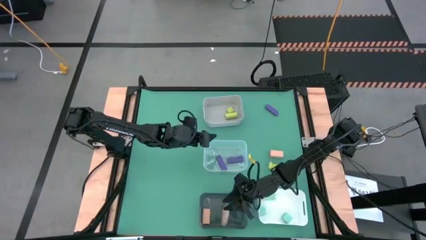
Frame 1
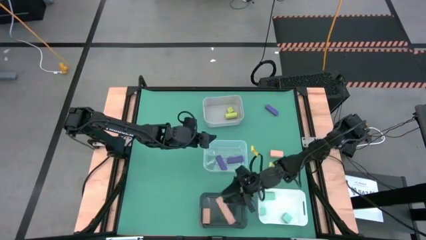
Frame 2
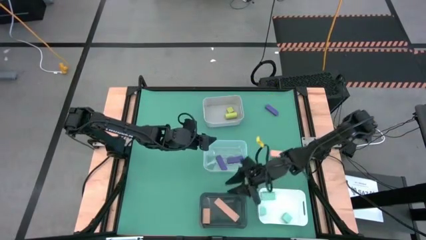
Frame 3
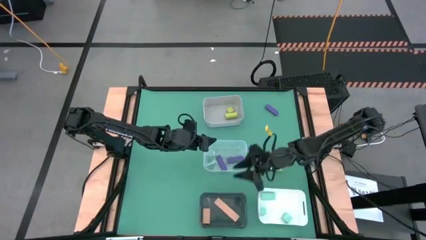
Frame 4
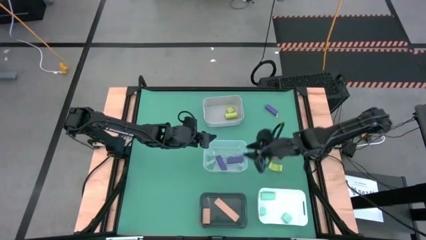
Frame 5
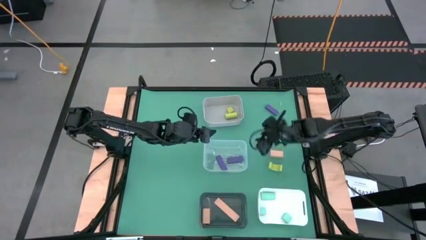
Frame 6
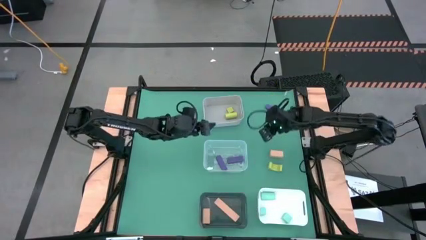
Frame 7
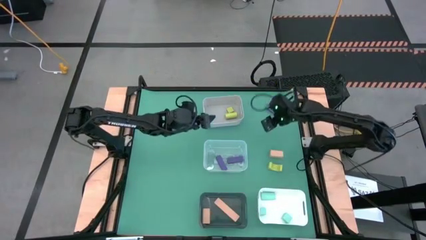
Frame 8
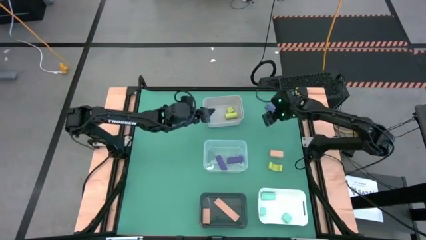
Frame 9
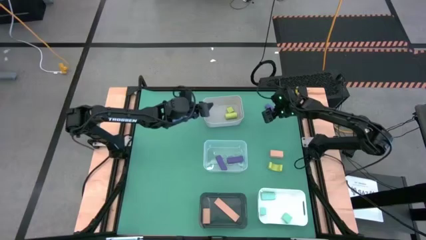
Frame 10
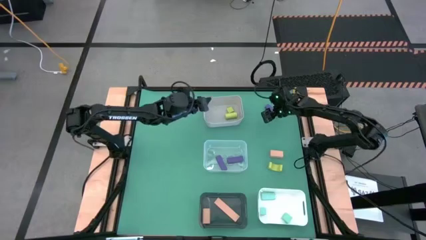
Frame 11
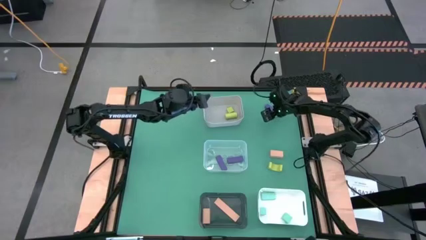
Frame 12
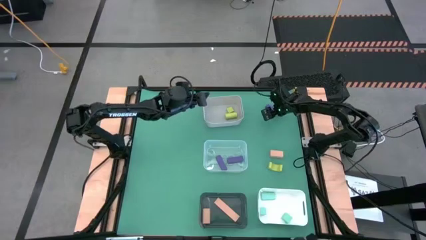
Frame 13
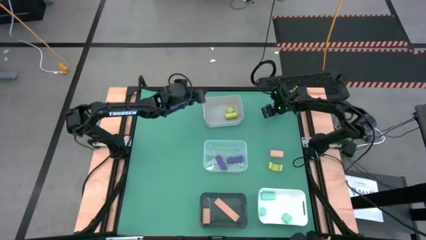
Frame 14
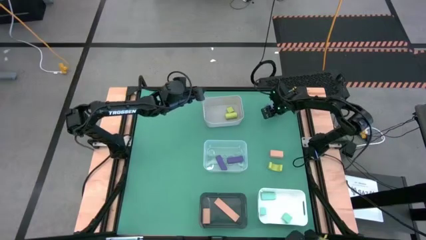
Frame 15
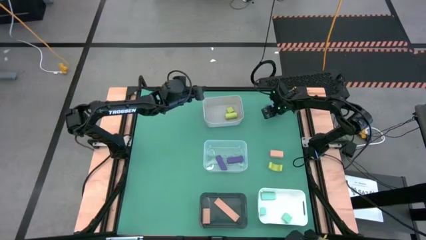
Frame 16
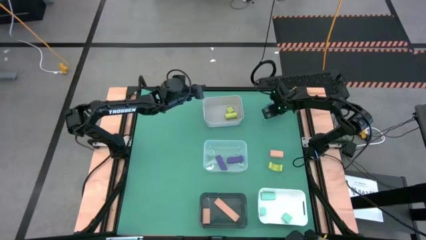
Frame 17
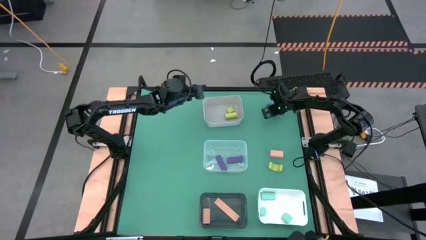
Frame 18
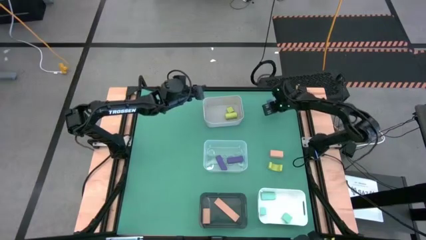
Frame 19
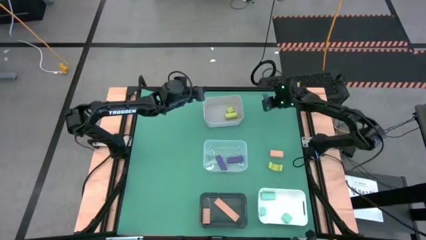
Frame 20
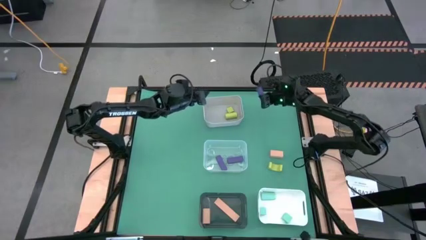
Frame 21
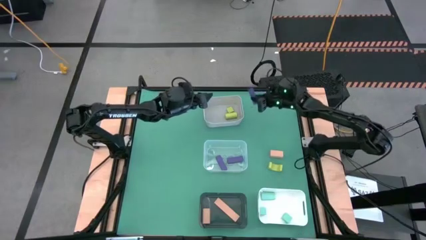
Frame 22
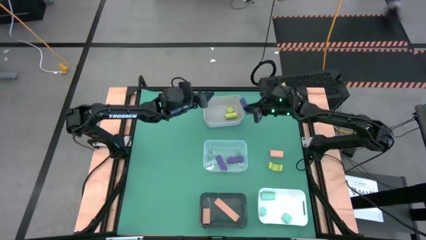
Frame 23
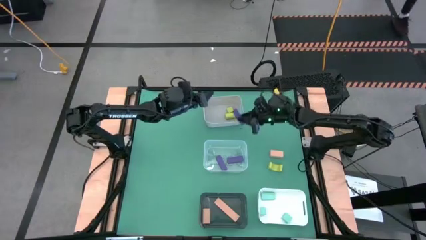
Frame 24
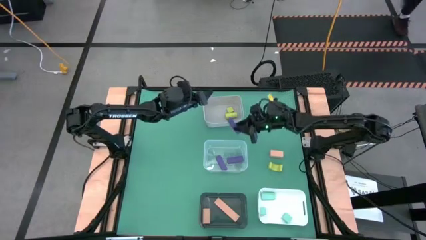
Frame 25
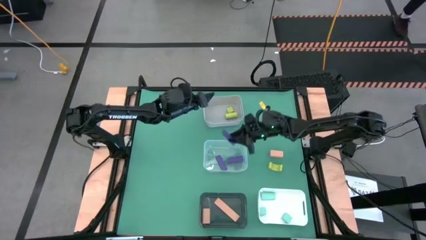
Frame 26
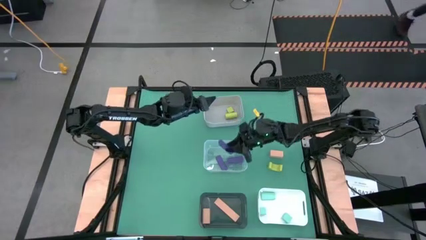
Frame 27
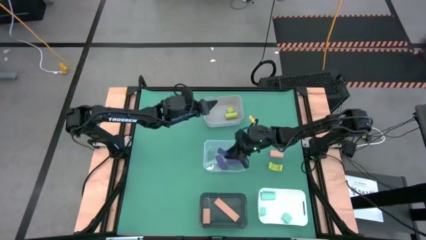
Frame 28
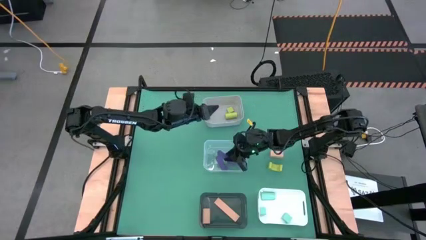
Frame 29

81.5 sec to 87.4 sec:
Task: Sort & place blocks by color
Put the violet block into the transparent bin

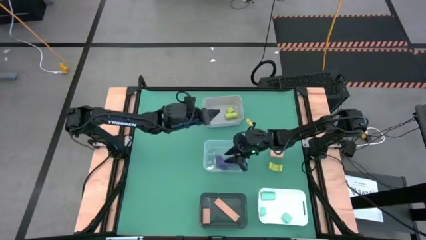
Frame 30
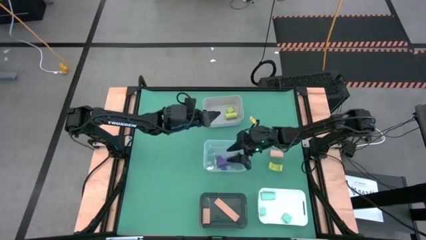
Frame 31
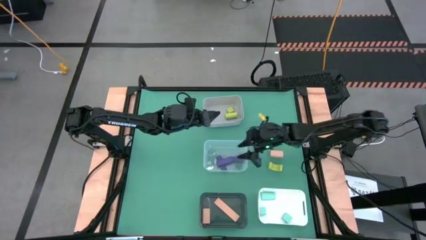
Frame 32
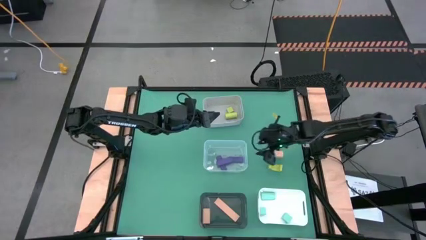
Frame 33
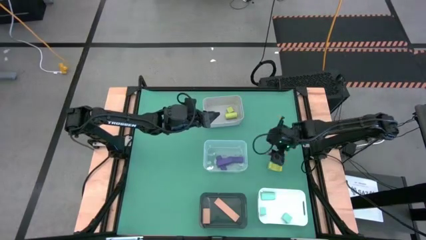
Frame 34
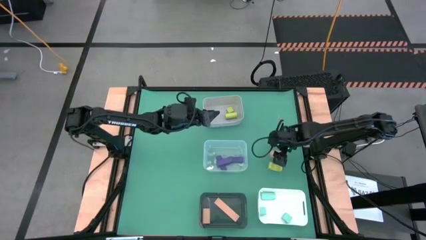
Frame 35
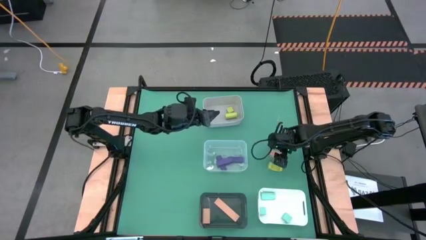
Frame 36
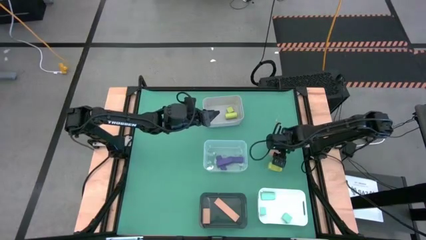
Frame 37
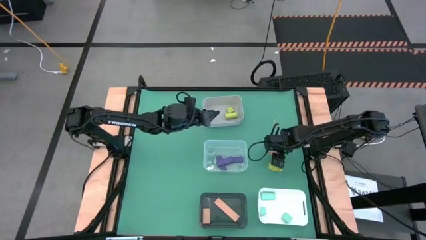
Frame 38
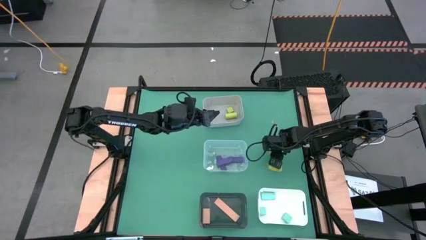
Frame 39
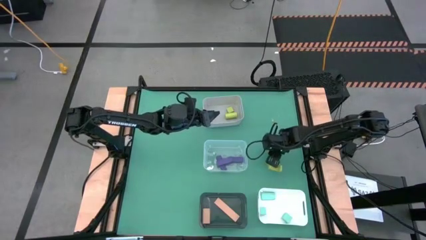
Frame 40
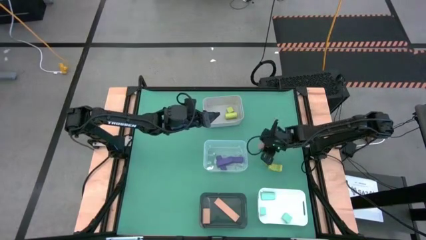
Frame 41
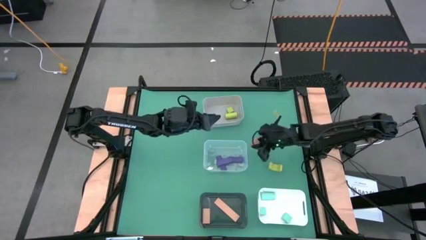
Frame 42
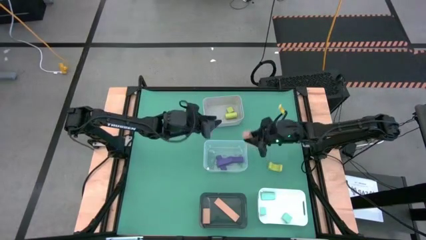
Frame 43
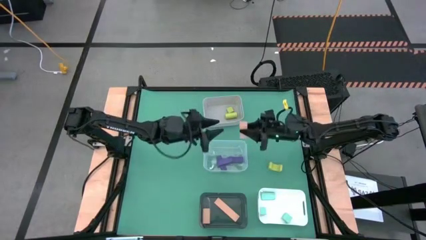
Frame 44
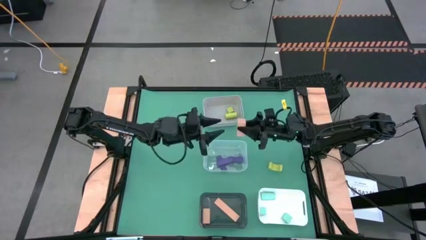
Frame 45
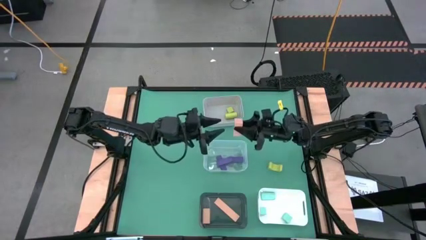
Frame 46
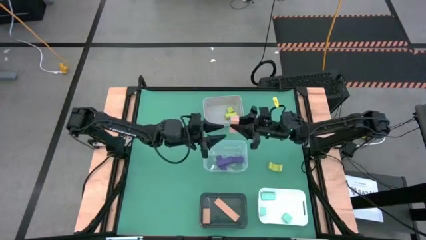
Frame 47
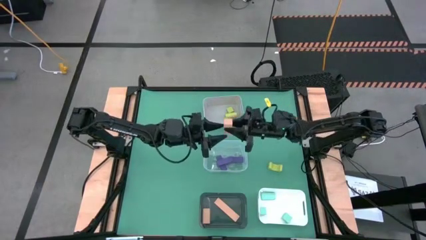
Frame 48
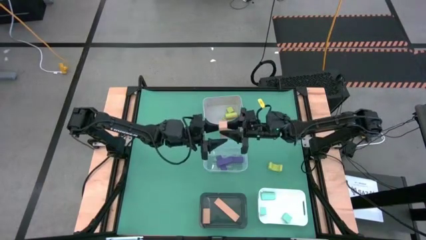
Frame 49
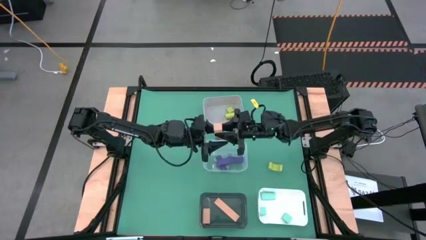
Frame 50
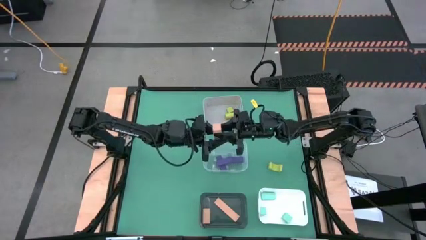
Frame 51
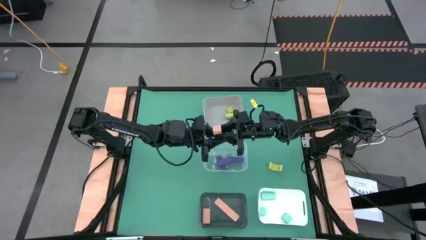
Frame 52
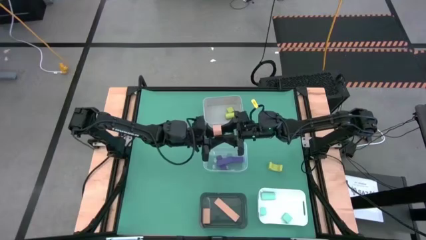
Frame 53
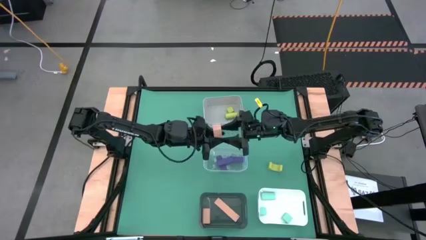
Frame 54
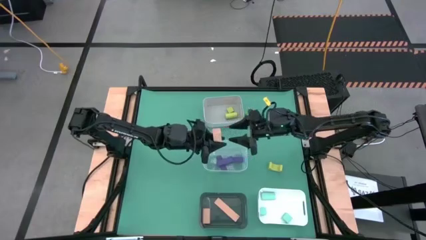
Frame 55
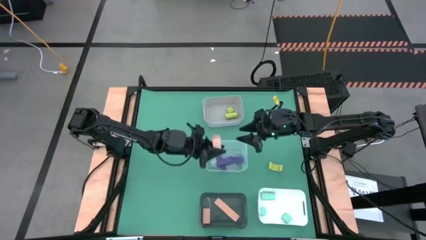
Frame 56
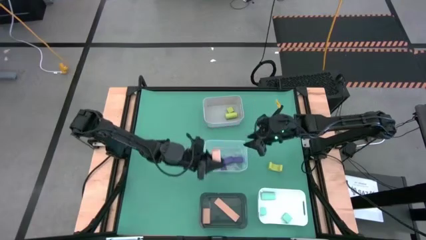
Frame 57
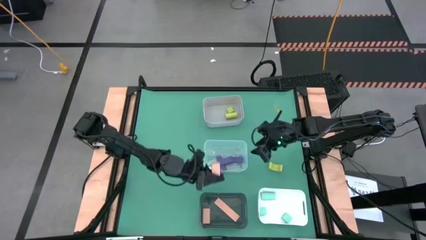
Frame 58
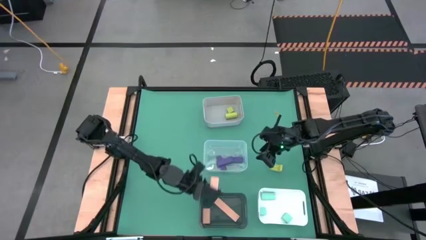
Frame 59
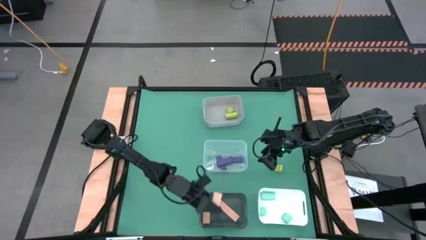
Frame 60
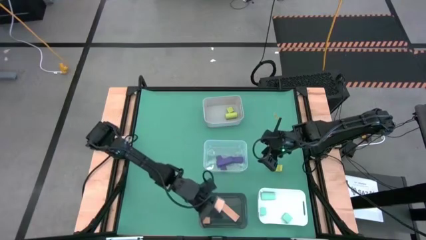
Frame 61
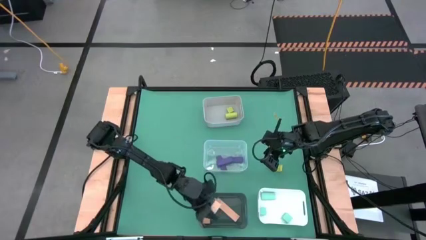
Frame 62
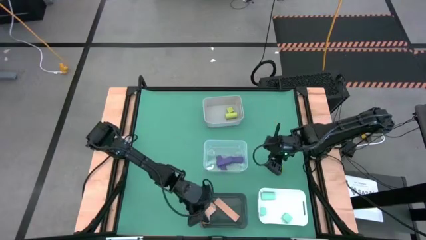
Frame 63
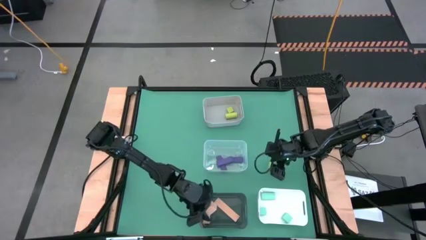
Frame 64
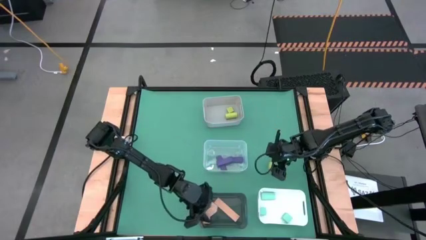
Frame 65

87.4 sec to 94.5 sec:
Put the pink block into the black bin

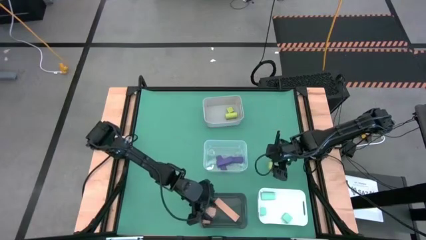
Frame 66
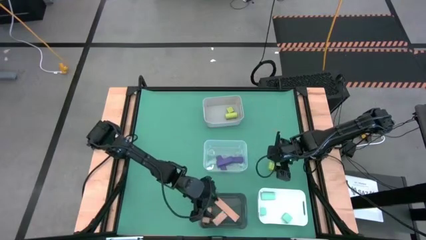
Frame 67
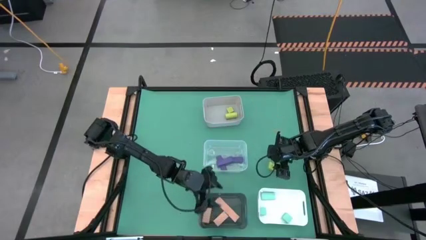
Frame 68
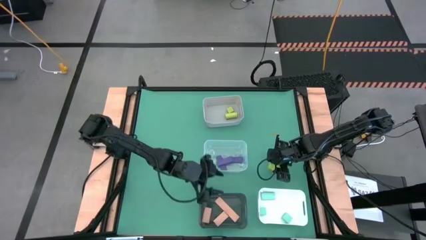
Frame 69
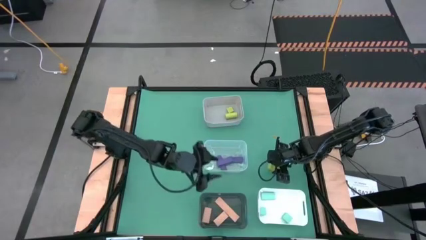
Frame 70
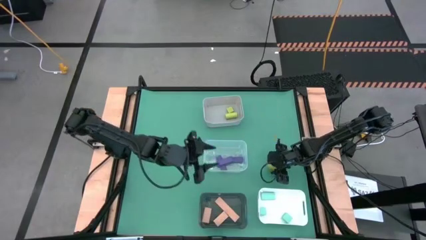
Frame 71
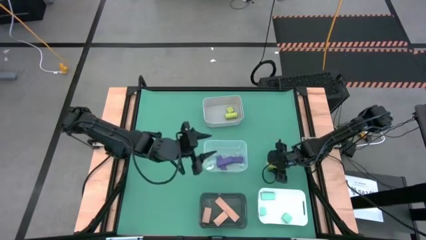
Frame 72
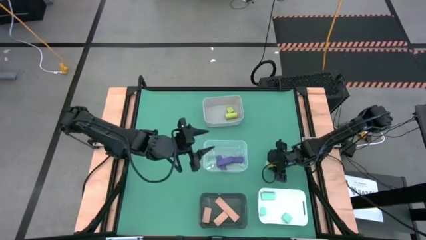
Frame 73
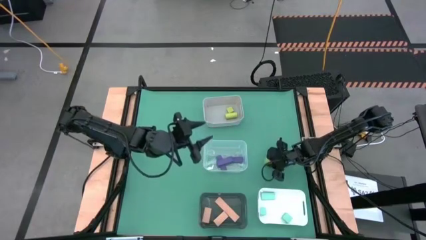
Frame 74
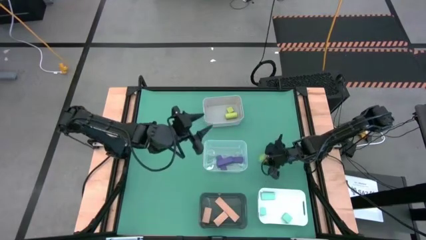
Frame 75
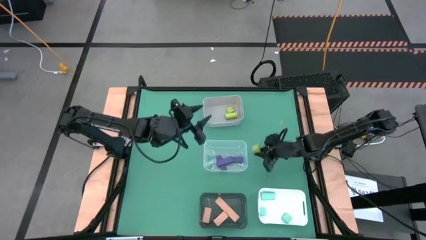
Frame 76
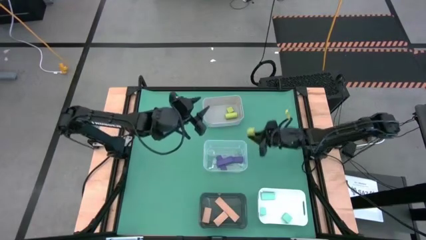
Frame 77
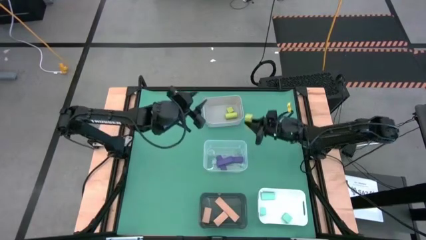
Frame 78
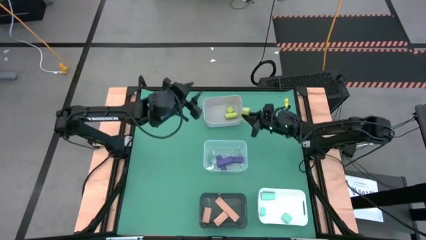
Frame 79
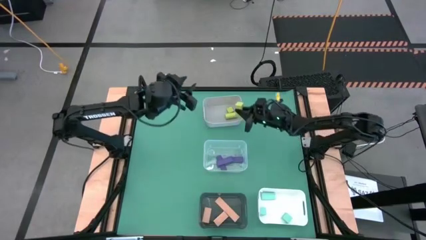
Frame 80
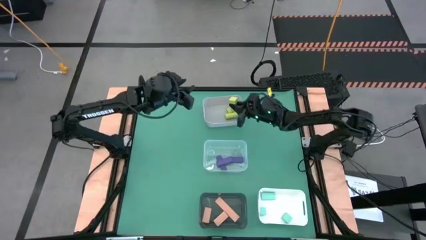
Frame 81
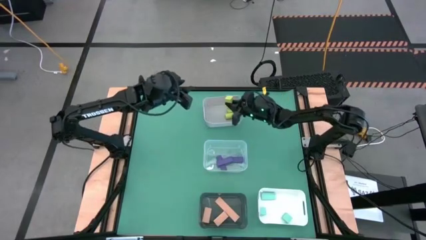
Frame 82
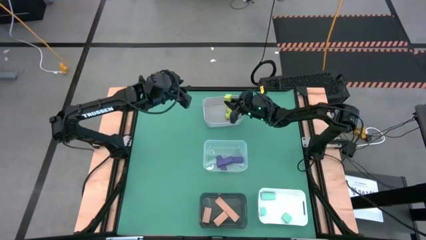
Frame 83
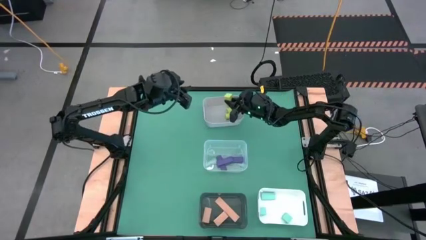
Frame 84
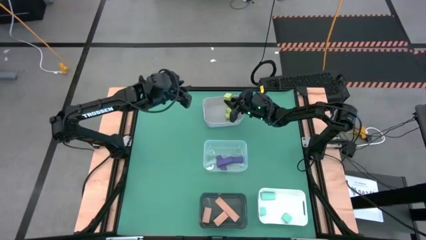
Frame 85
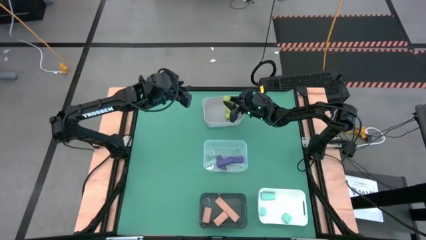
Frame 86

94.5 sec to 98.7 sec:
Put the green block into the gray bin
